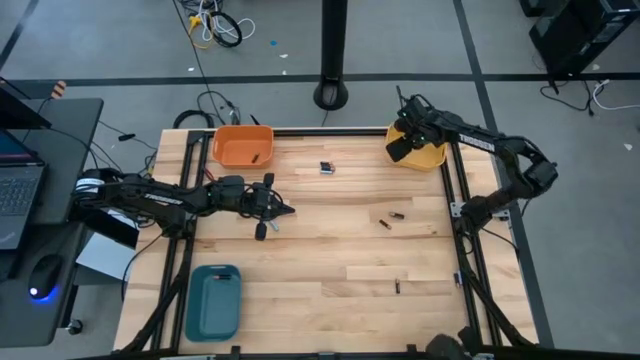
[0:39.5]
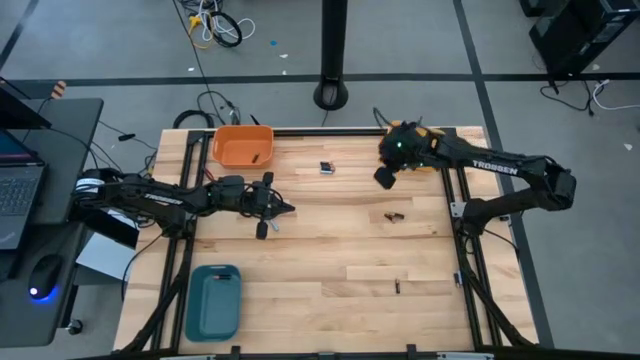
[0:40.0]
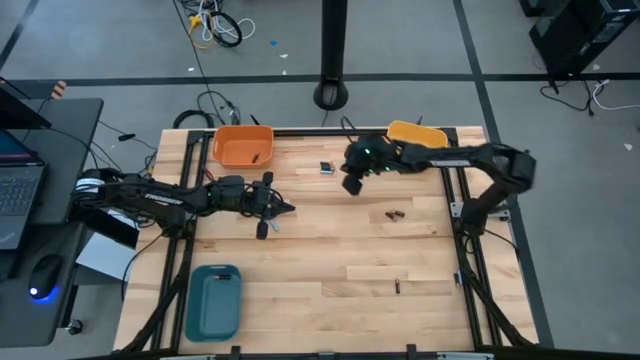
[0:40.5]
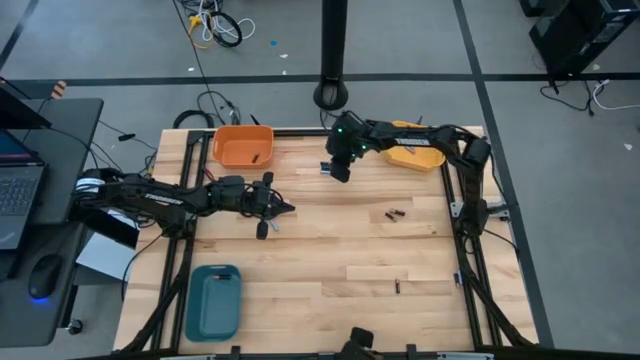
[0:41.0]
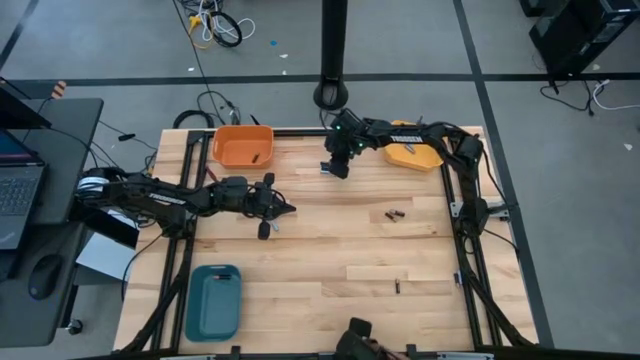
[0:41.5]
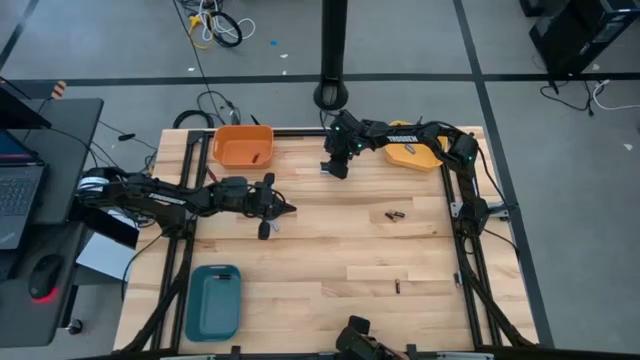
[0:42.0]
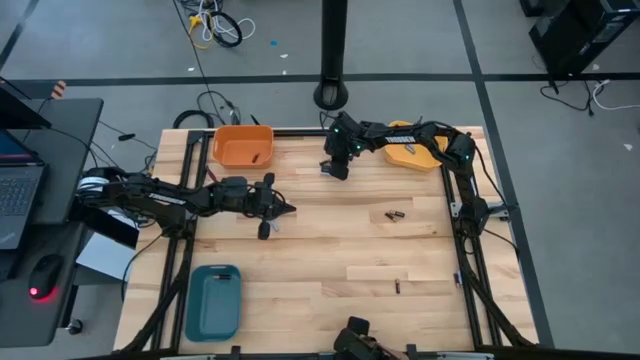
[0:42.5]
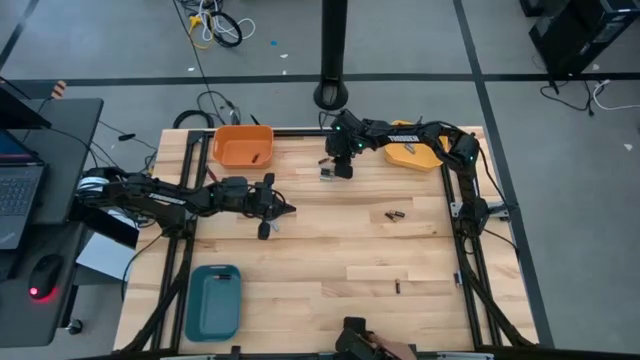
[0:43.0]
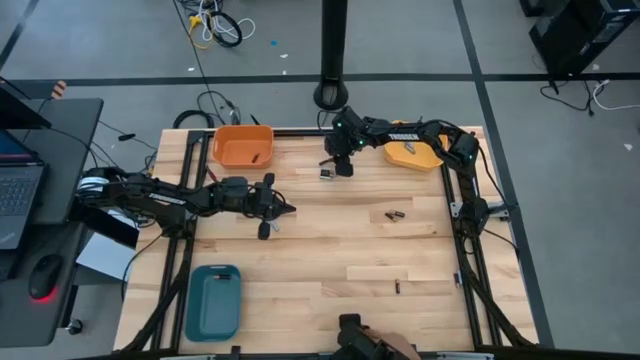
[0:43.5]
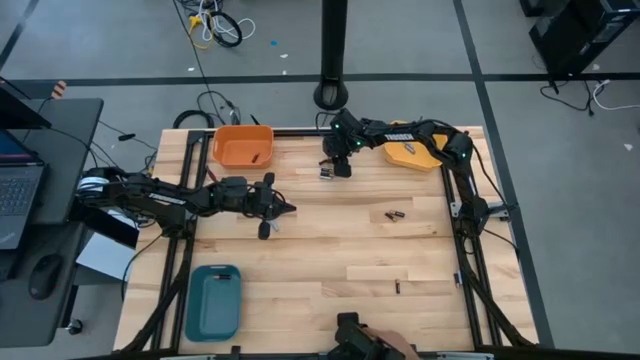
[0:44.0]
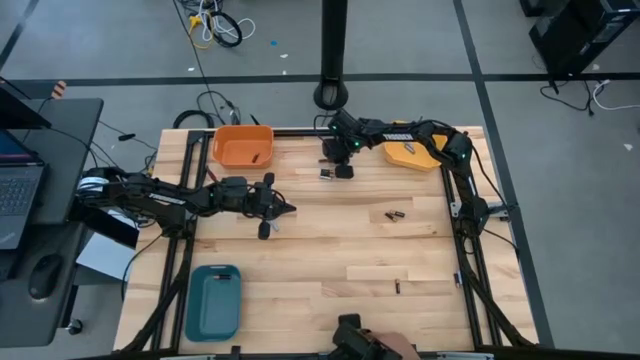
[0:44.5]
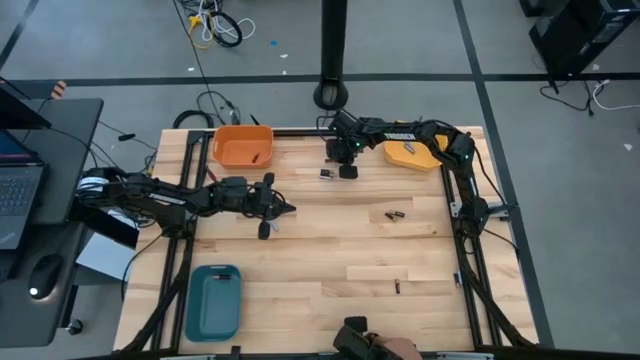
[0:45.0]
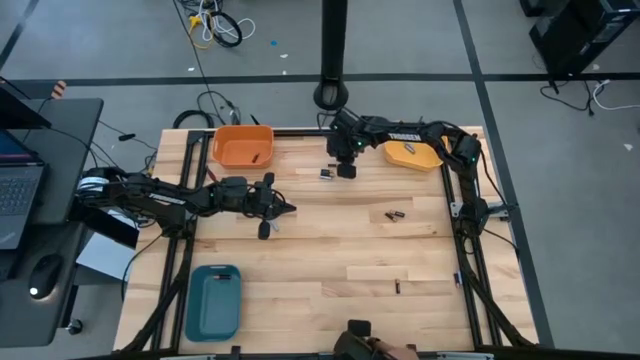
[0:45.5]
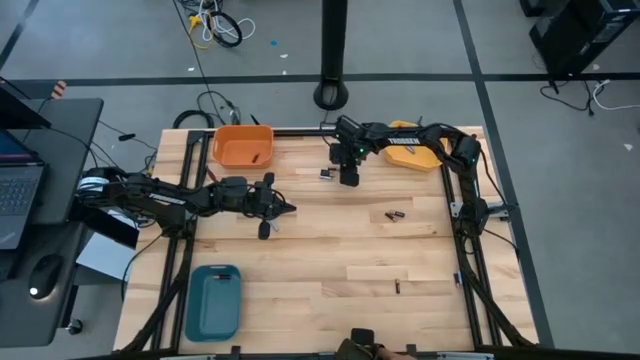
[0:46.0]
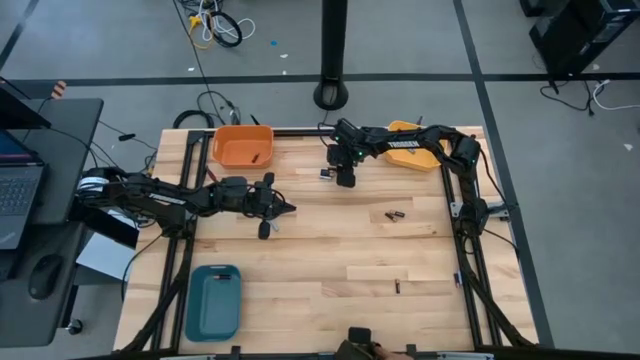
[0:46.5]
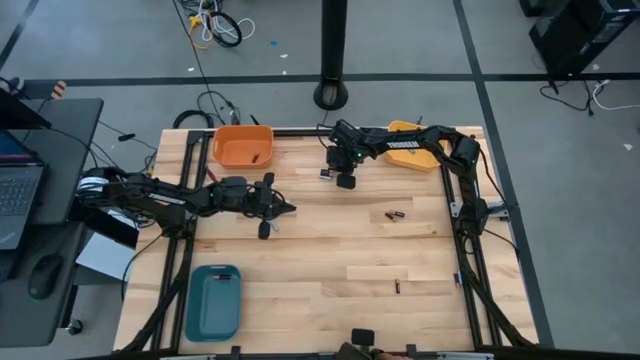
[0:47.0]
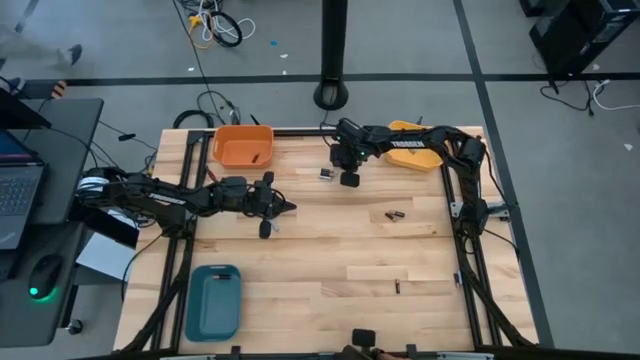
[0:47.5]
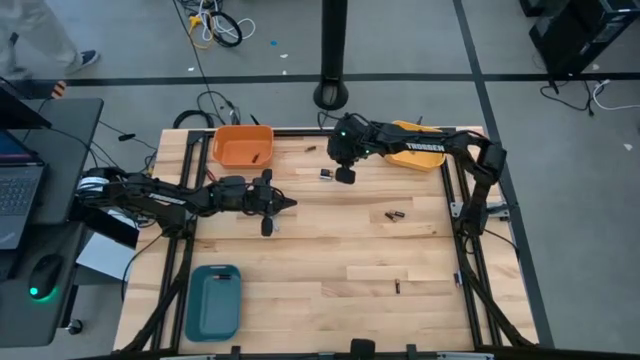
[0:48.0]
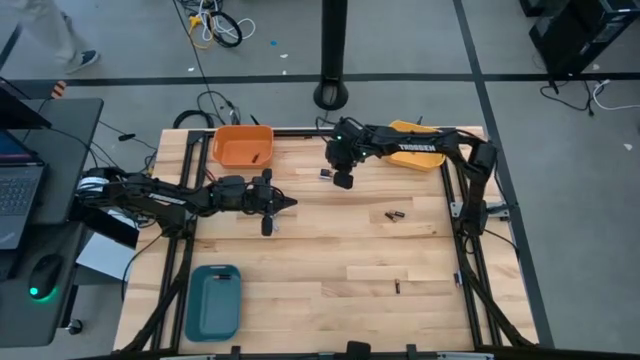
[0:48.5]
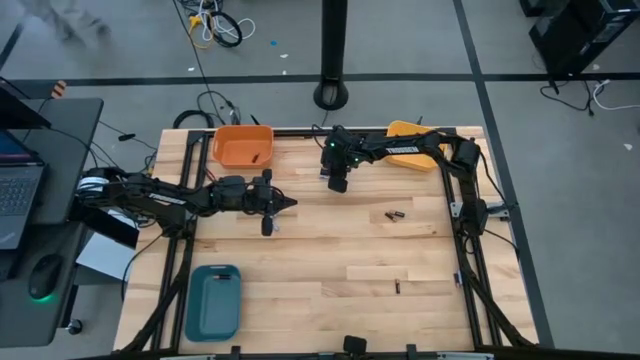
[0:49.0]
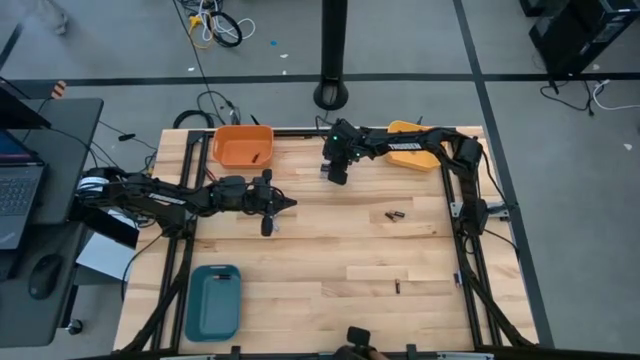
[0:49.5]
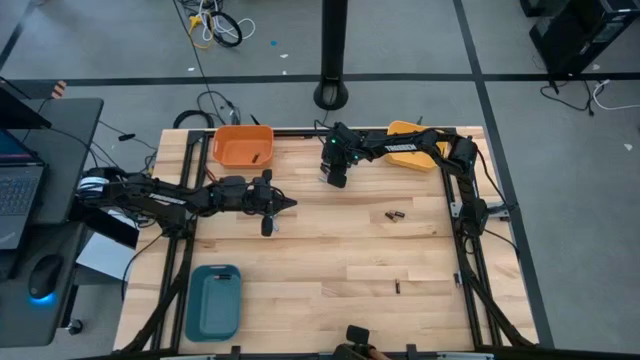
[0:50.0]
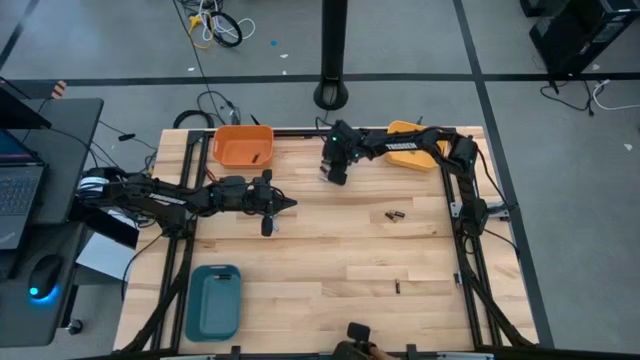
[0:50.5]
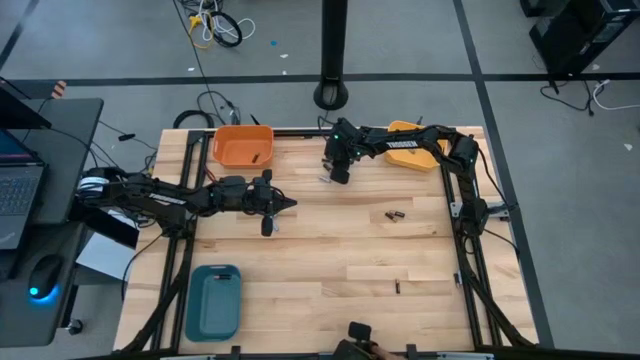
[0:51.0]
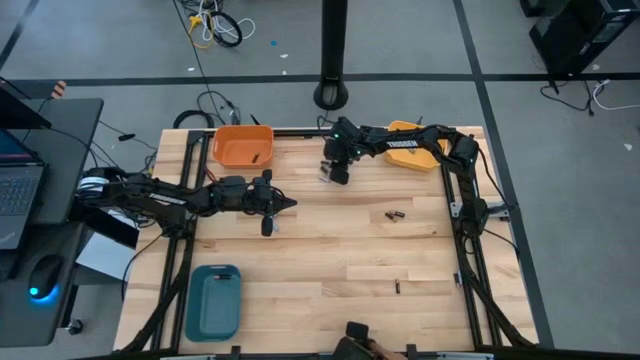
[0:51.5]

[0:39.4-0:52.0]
Task: Sort batteries
Put the small copper and black battery into the orange bin

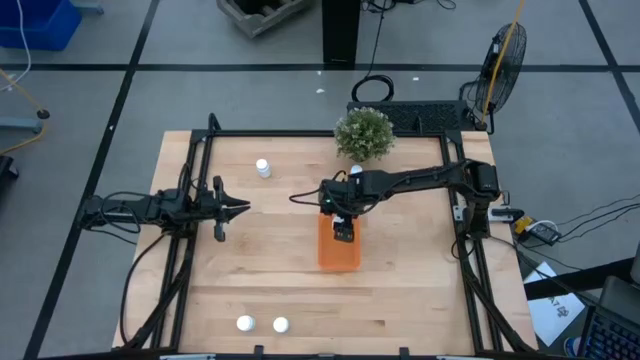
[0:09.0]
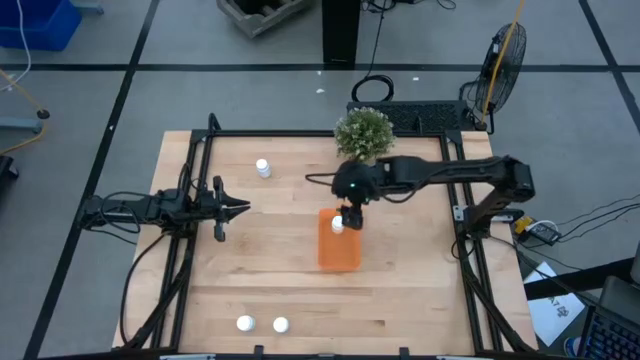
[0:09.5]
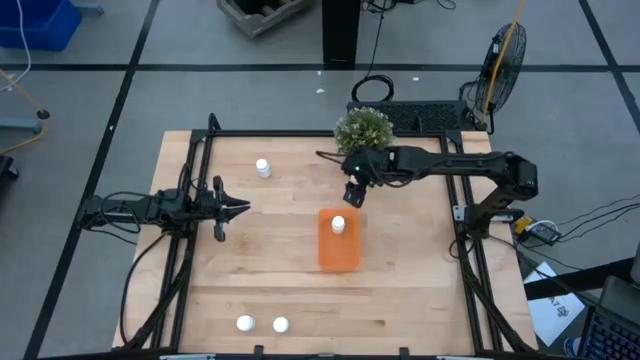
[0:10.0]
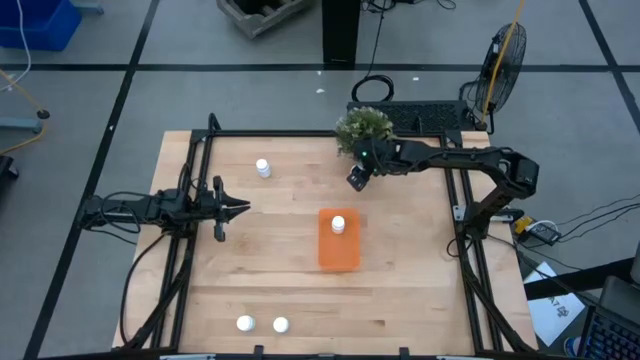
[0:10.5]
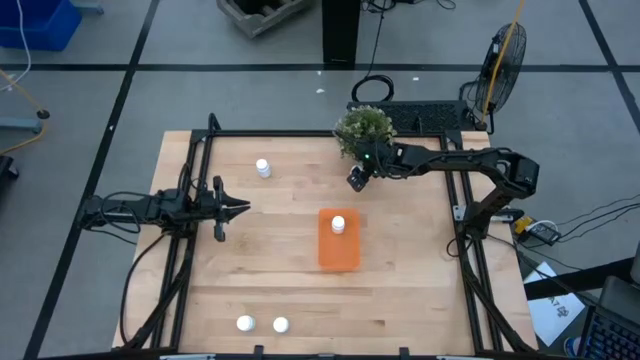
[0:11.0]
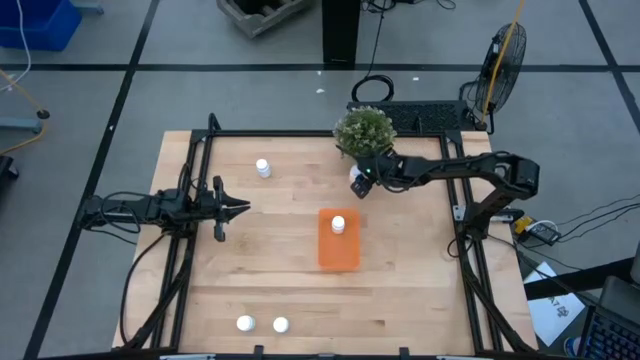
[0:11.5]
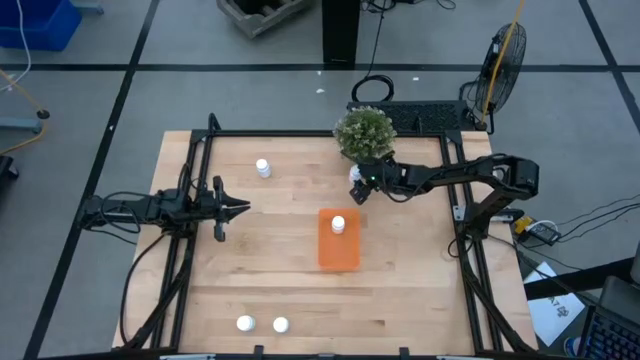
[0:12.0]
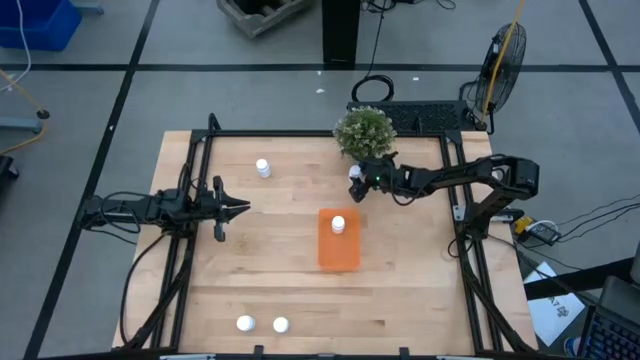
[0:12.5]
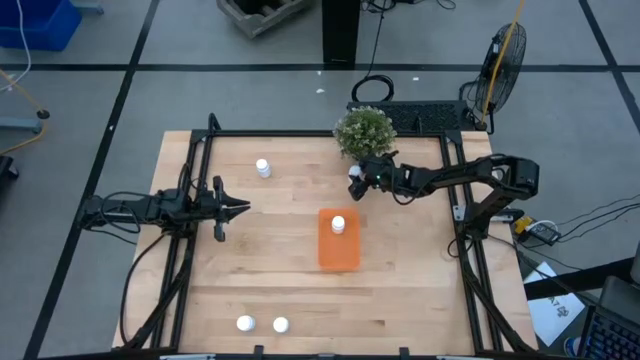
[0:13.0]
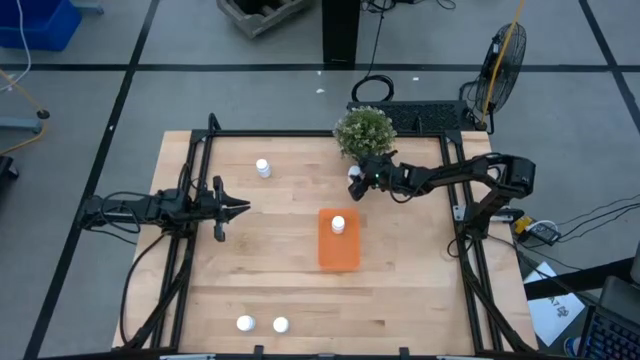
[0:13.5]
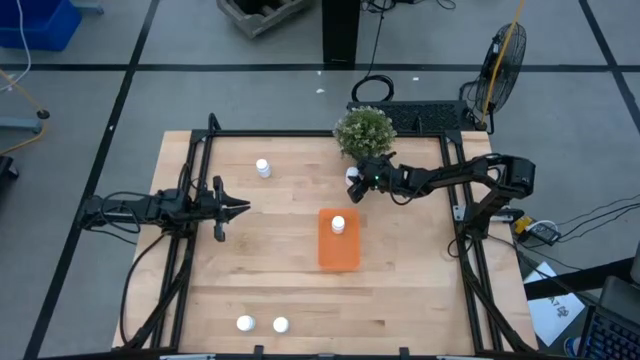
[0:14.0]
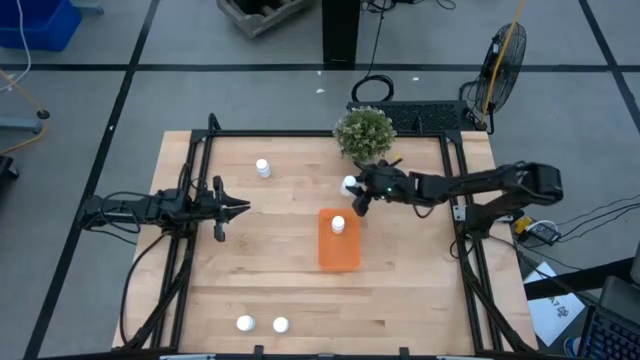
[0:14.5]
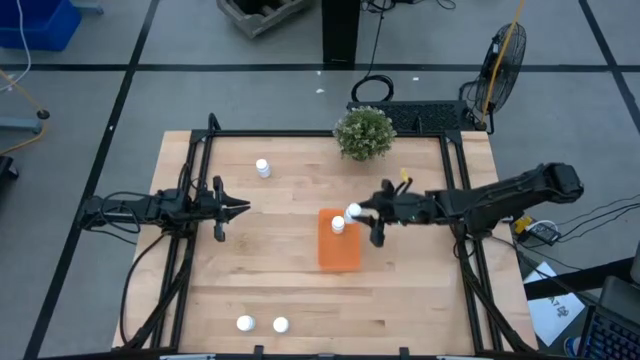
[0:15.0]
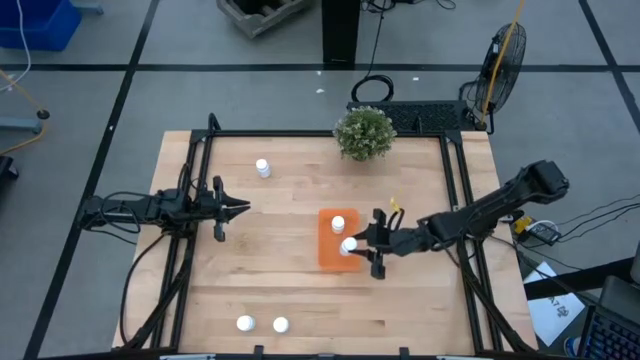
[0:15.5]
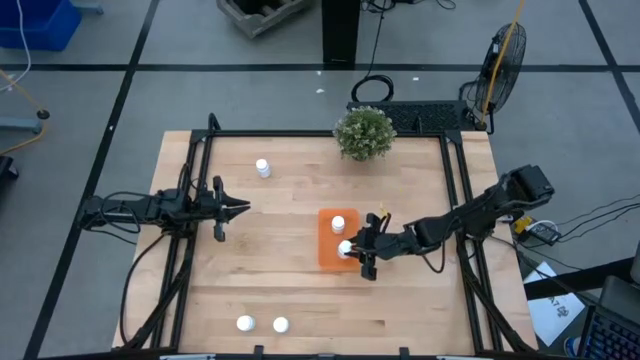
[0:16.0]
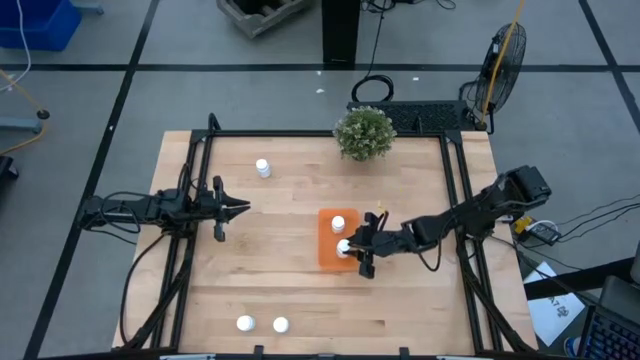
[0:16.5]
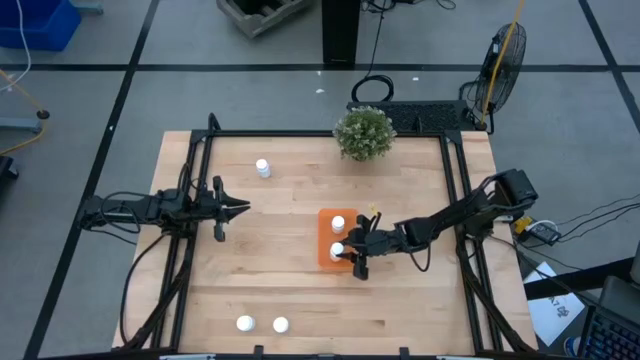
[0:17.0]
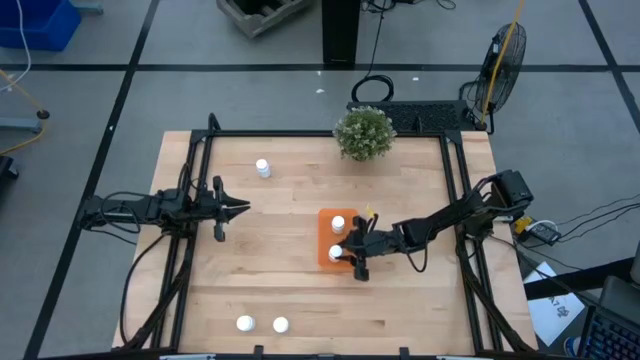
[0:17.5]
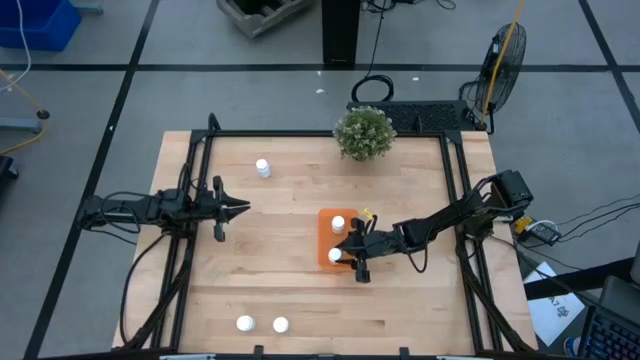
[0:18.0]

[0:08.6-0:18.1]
Task: Pick and place pill bottles into a basket
Put the white medicine bottle into the orange bin
